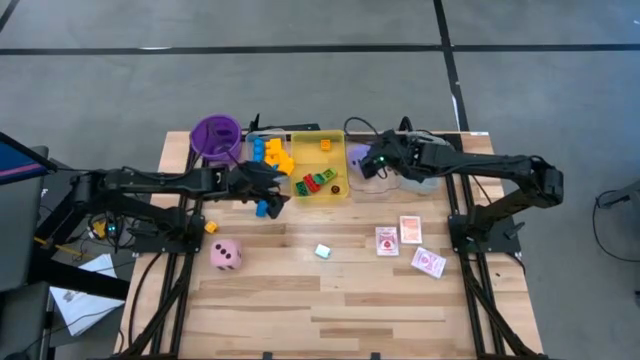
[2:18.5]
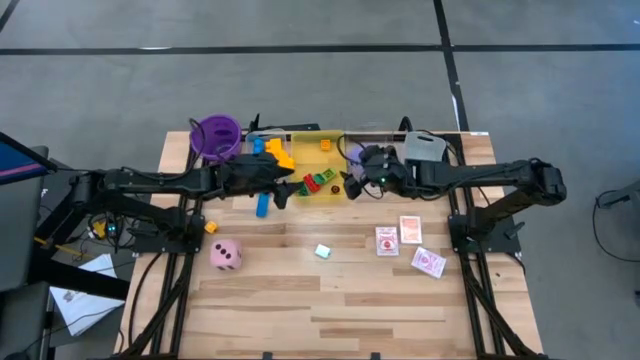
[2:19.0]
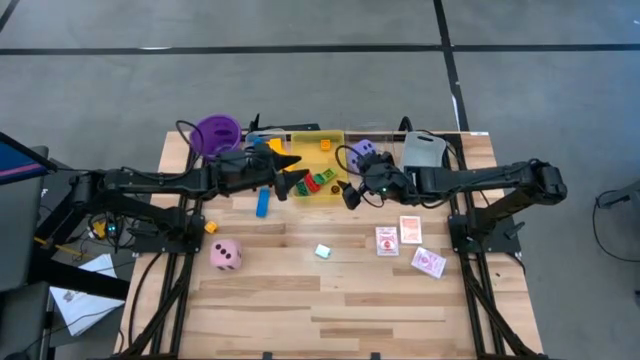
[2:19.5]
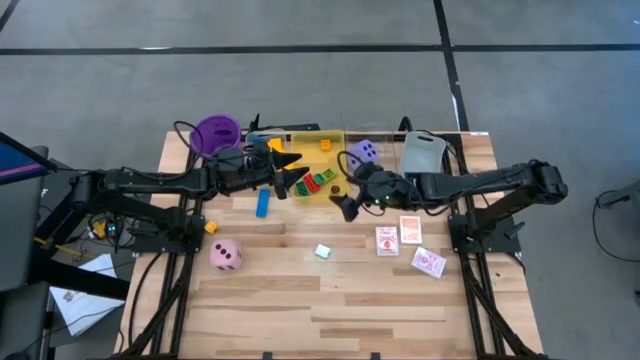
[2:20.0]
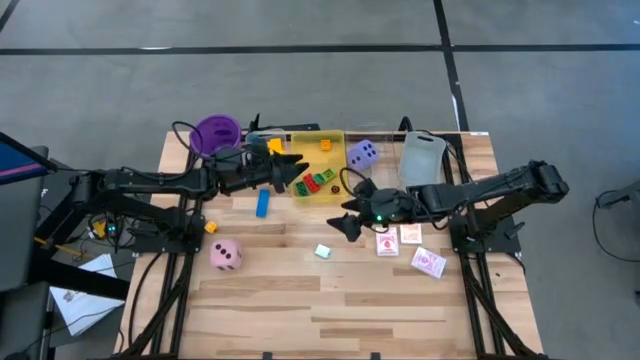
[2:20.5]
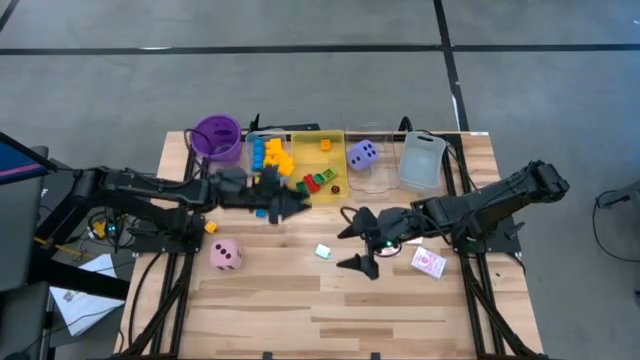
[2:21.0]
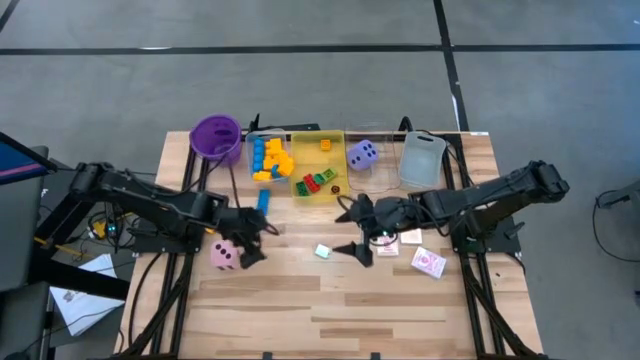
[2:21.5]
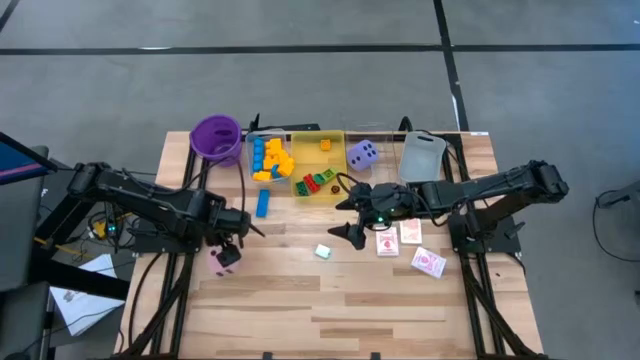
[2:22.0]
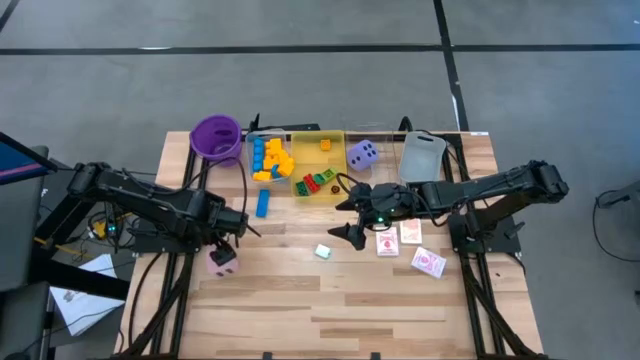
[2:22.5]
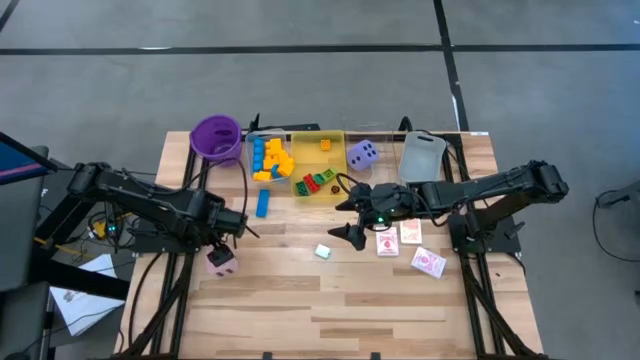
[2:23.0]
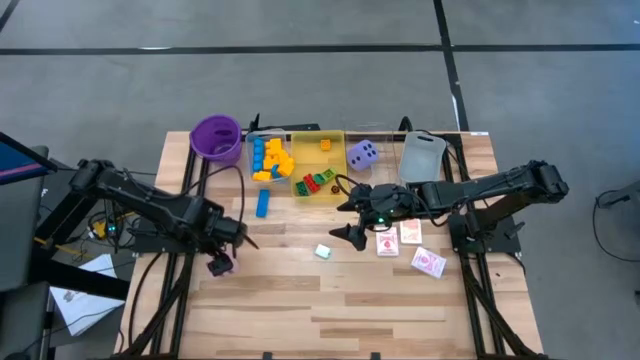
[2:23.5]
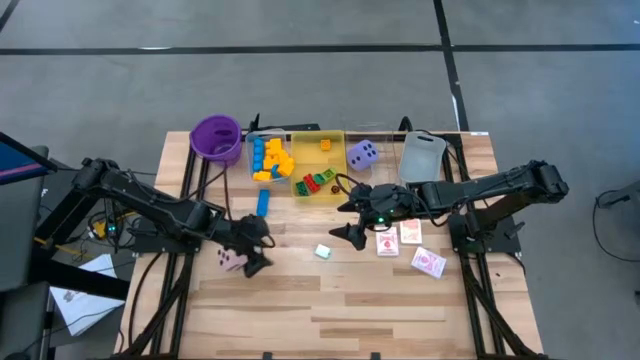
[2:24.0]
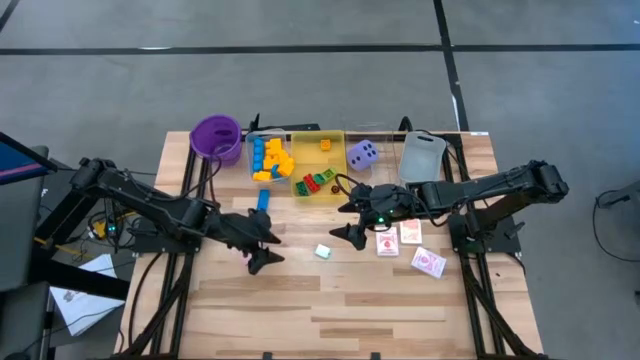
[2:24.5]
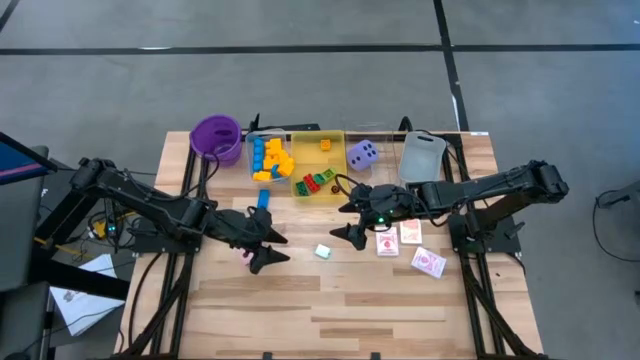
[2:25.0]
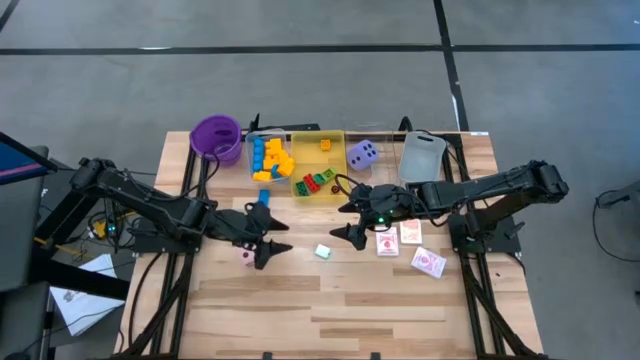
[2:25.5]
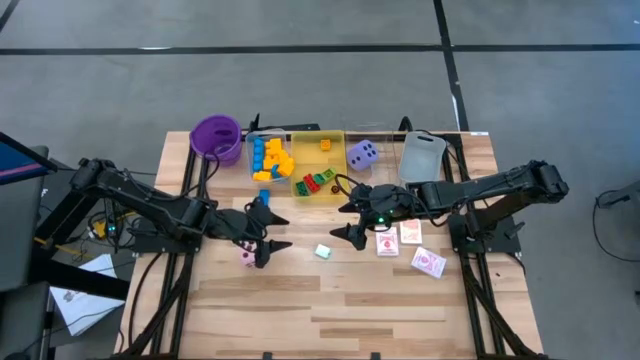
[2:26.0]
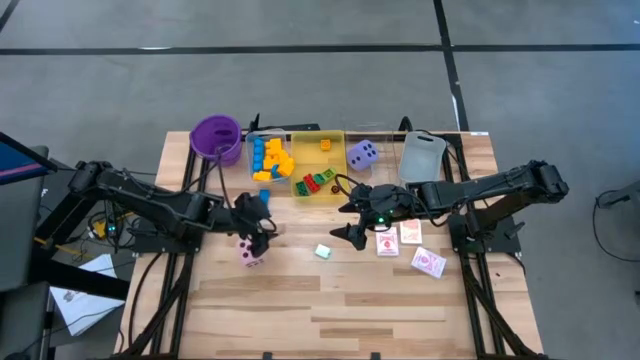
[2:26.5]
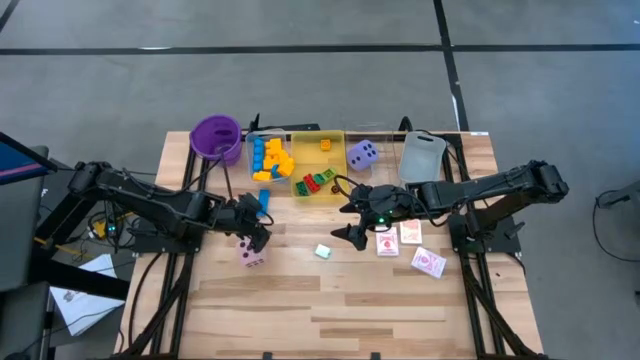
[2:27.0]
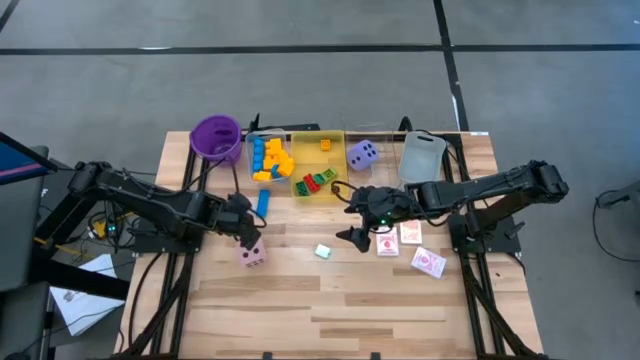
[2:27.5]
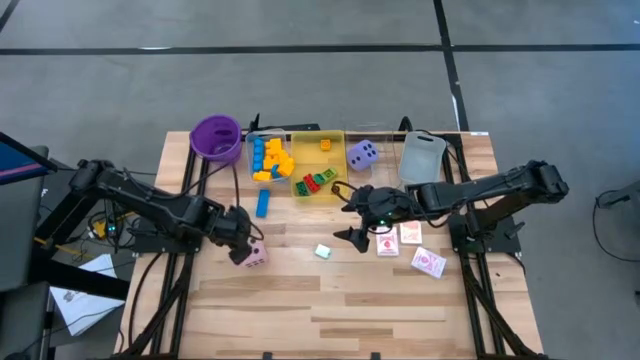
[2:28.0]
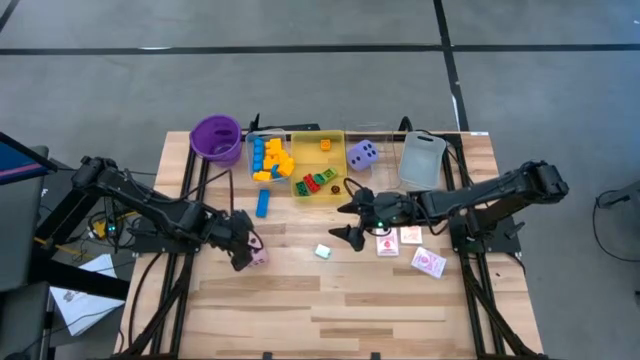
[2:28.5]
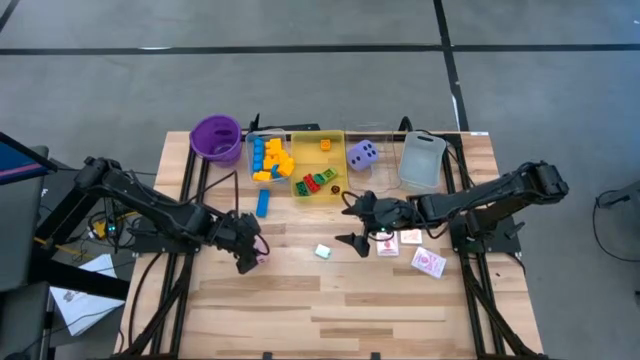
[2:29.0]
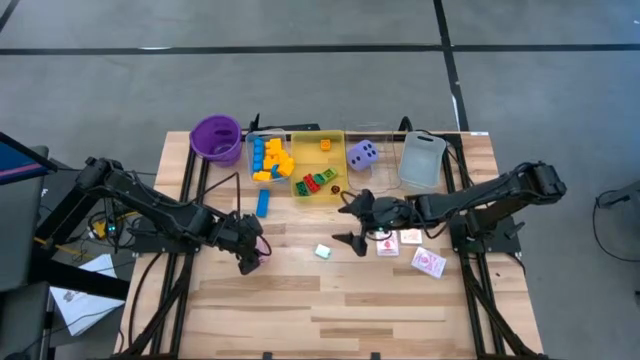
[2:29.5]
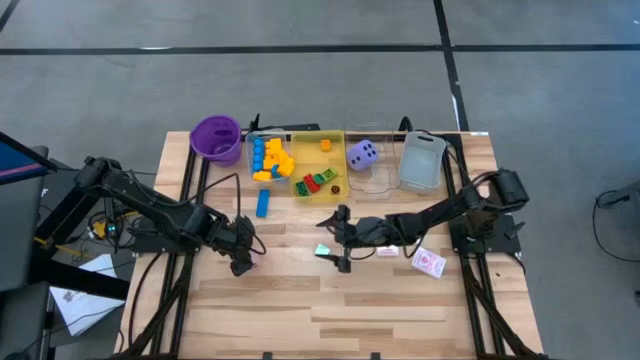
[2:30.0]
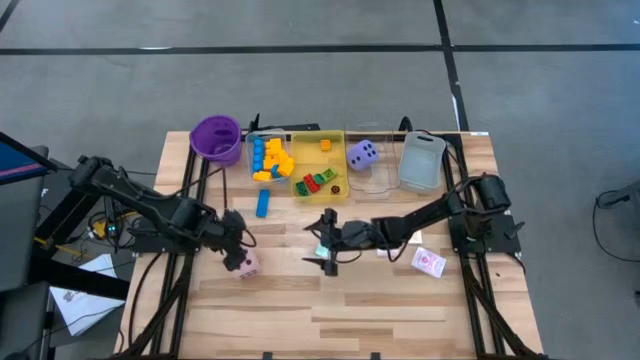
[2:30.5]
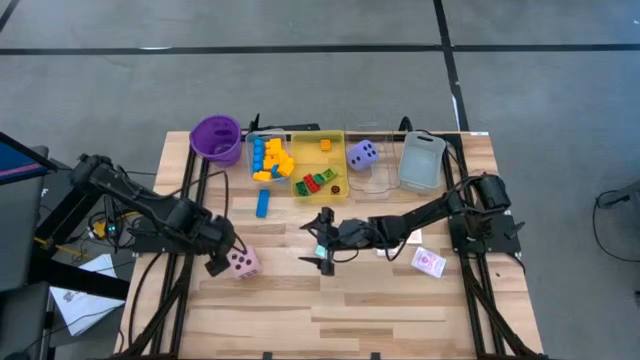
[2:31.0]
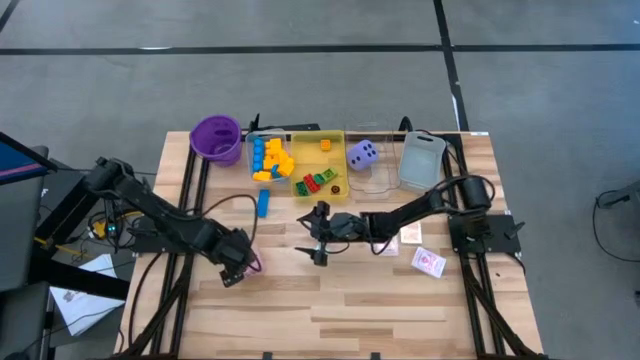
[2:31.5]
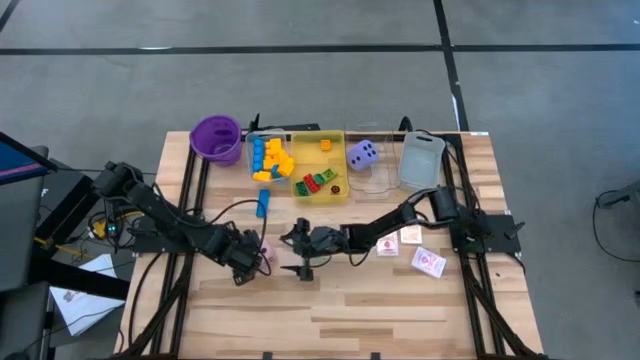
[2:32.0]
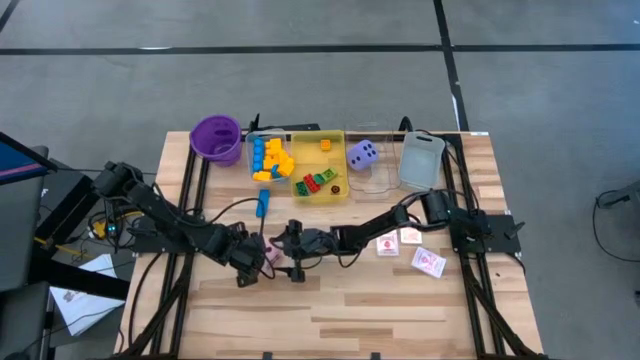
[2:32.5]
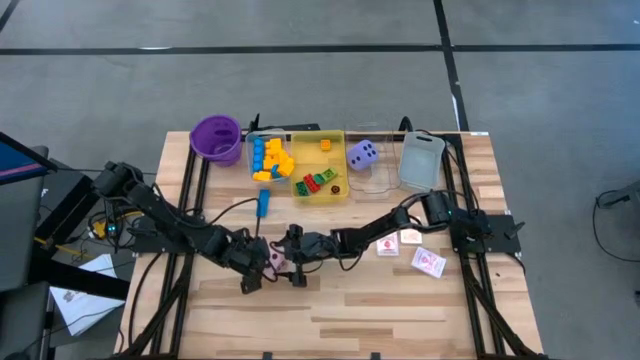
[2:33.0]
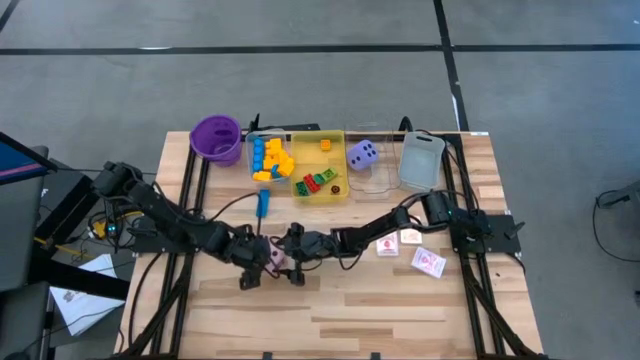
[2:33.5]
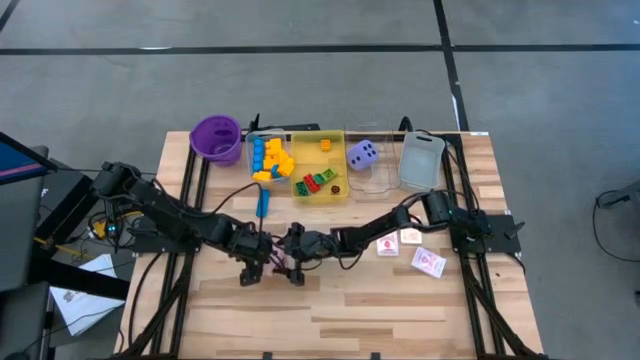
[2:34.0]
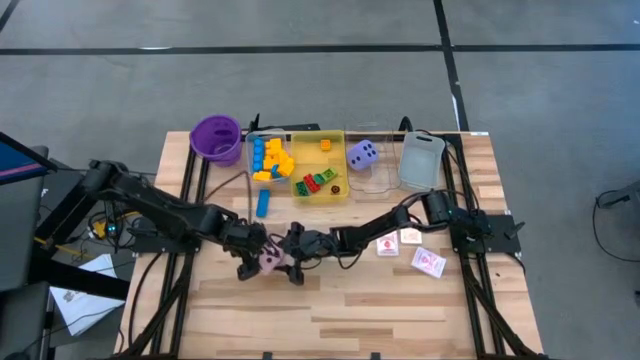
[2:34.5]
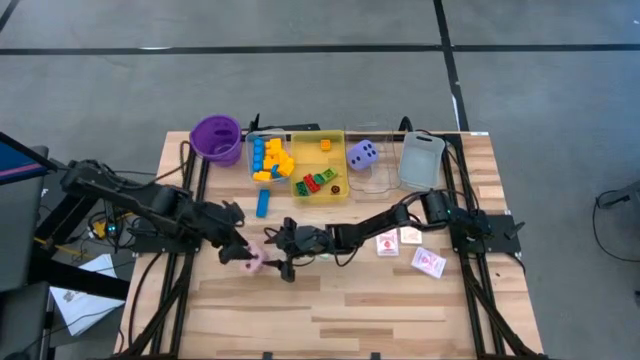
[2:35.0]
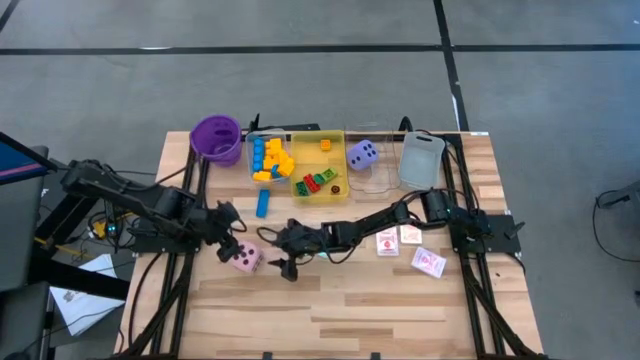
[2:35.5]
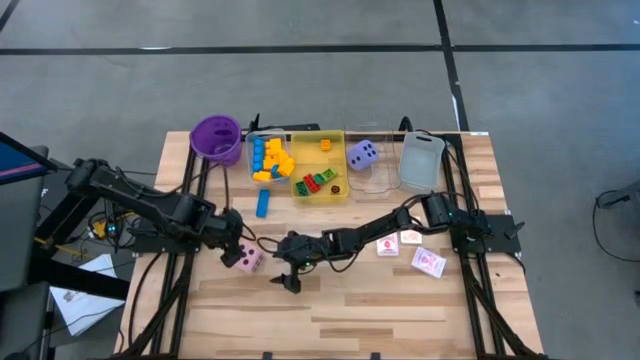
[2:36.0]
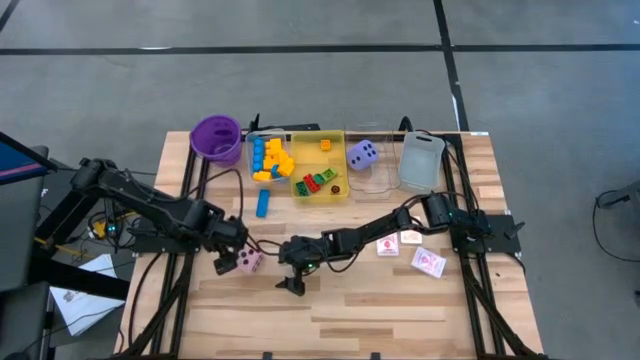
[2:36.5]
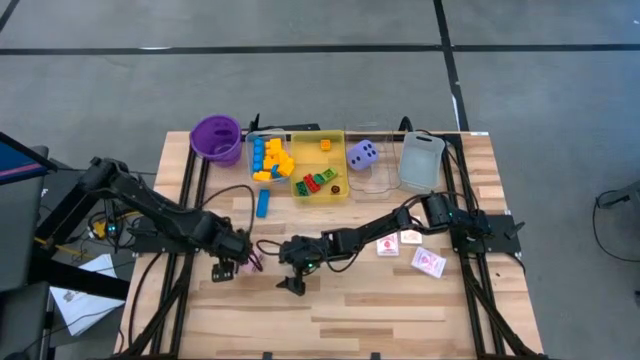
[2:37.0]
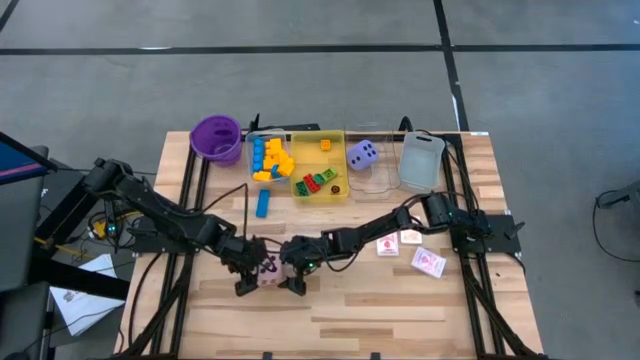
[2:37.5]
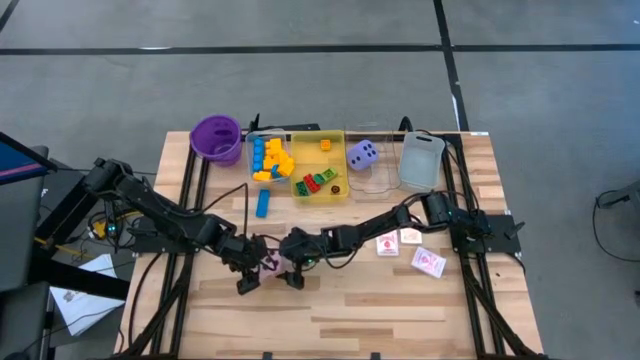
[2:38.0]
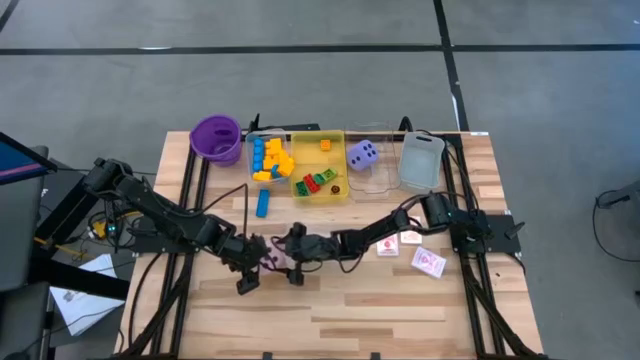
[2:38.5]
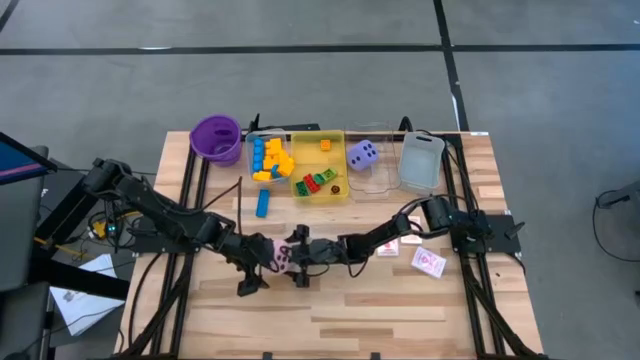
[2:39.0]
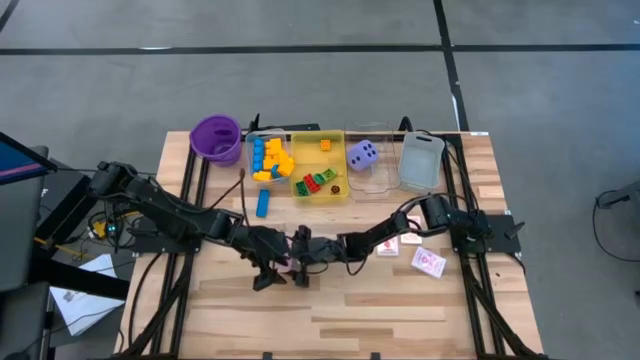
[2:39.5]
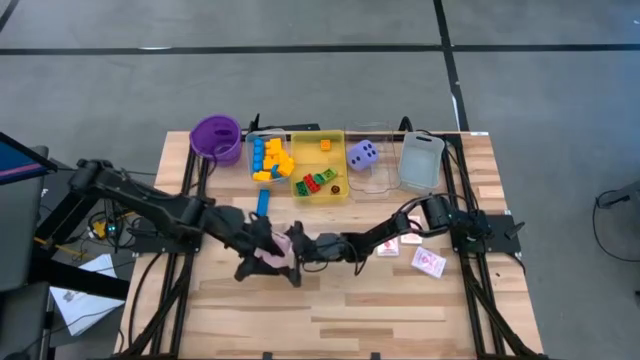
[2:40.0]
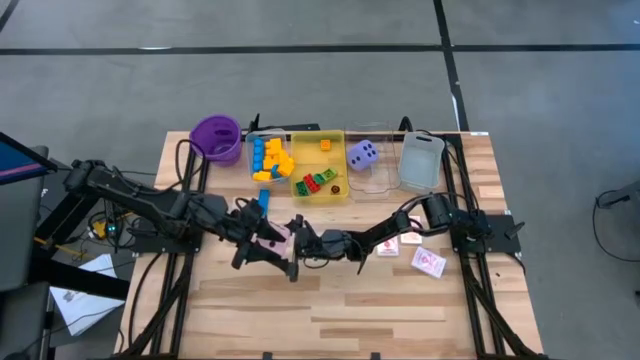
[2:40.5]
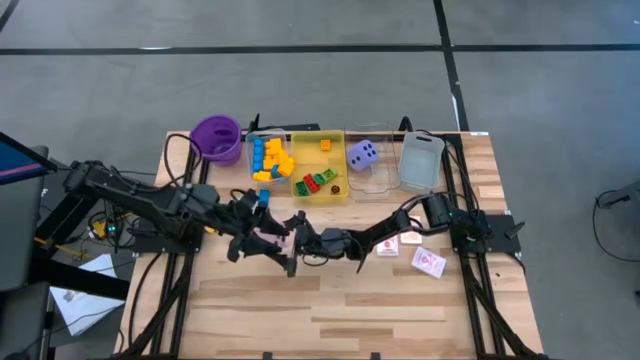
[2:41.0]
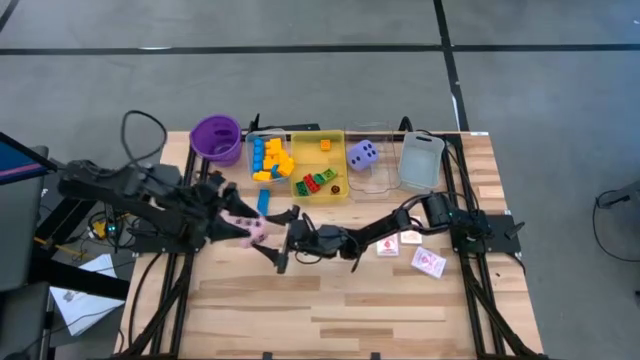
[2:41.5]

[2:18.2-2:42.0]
Task: Pick & Place Toys
Put the pink dice into the right transparent bin
